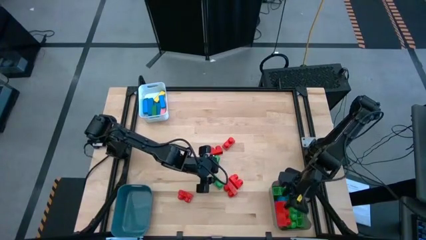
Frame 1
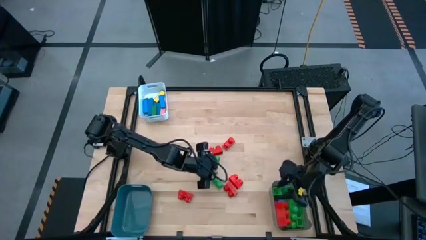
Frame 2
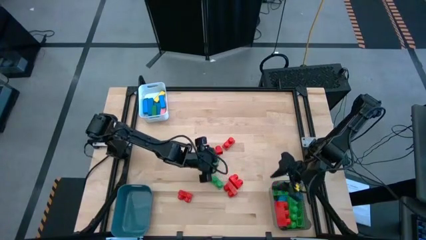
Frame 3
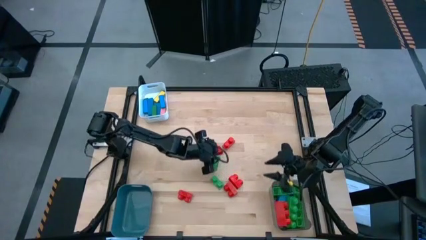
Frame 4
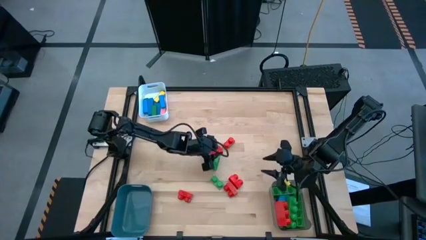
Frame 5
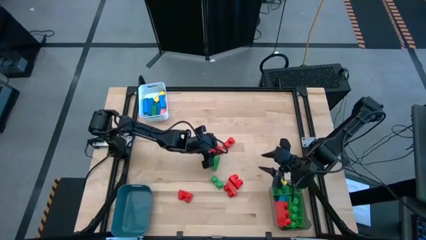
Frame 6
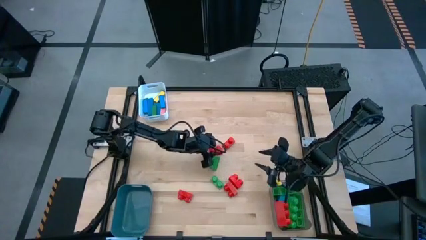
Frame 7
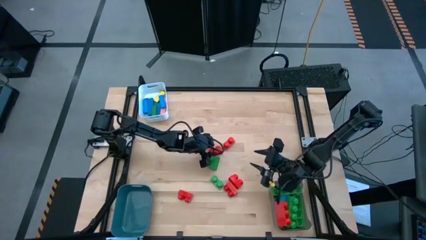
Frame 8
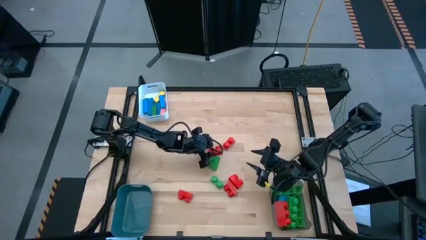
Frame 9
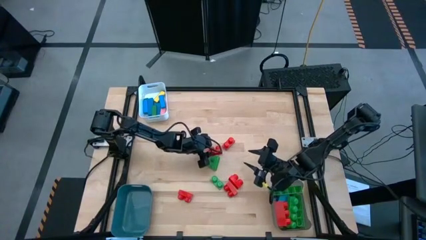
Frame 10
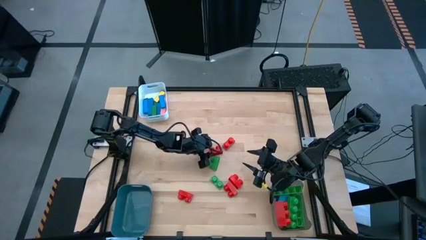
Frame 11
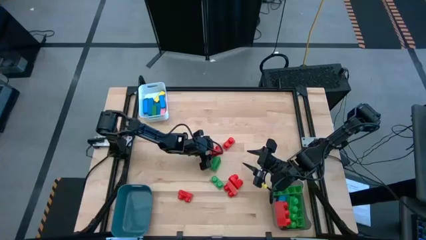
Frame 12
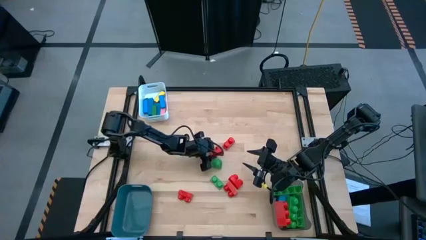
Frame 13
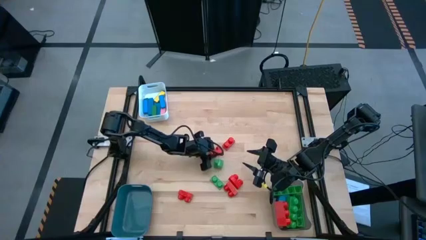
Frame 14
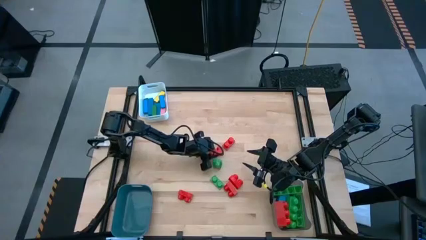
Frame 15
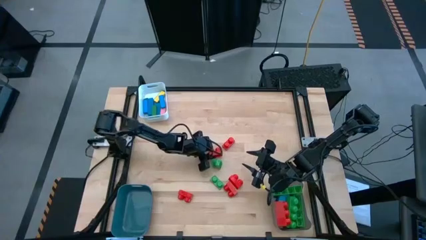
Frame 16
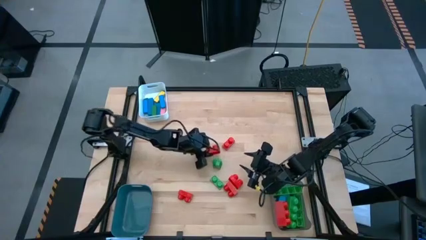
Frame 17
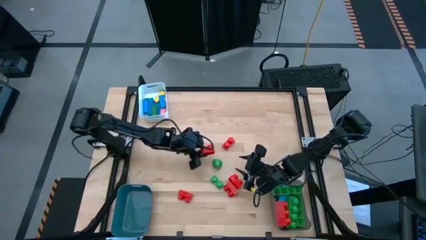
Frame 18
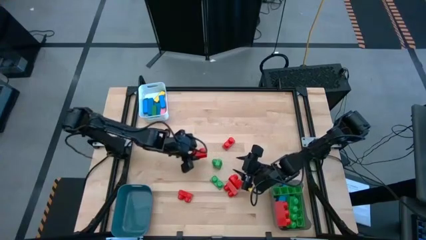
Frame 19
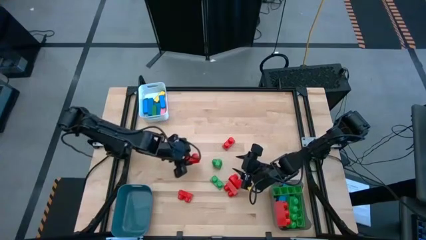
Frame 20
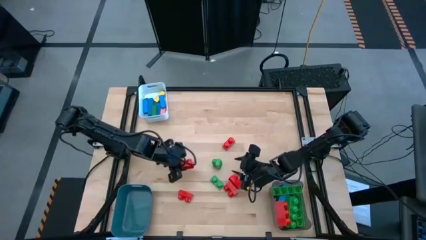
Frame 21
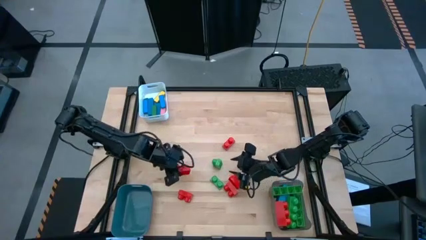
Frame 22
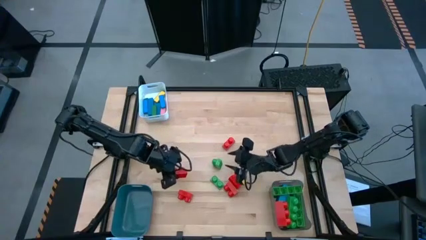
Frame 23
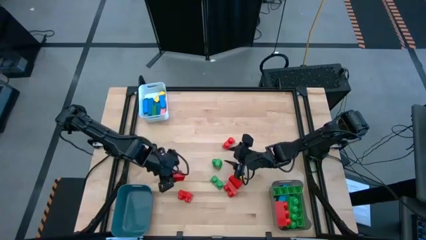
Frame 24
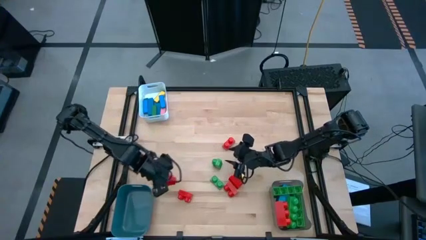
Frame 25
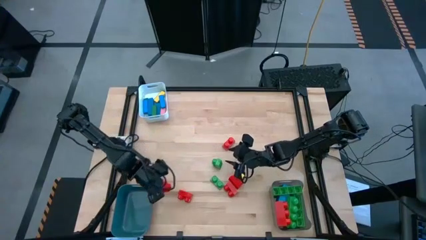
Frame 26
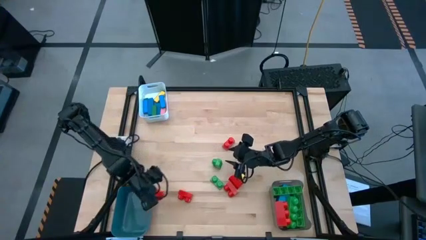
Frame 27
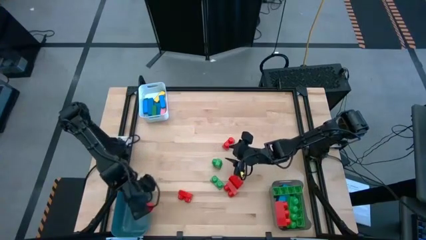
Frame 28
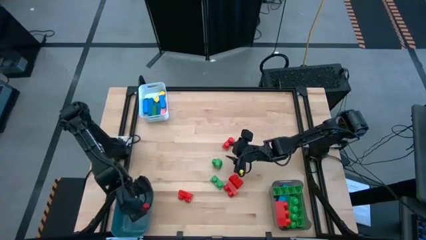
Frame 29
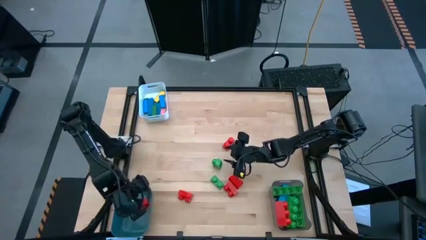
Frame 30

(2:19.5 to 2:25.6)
Task: Sort blocks by size
Put the red 2 stud gamepiece into the blue bin

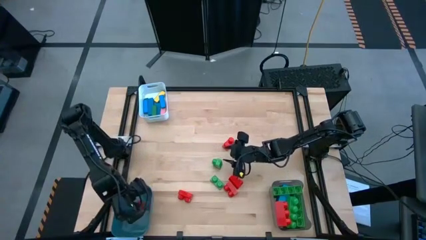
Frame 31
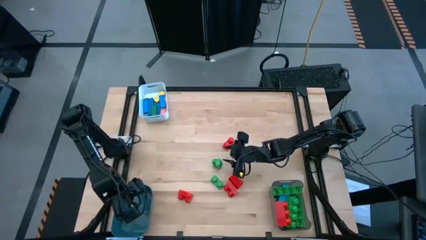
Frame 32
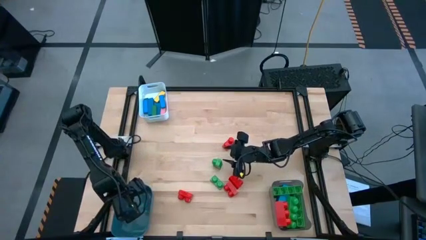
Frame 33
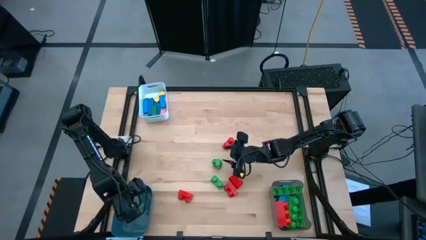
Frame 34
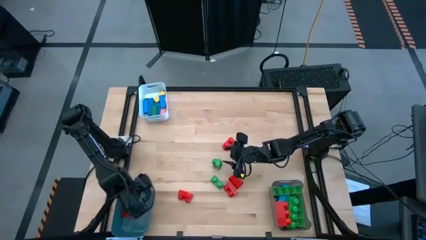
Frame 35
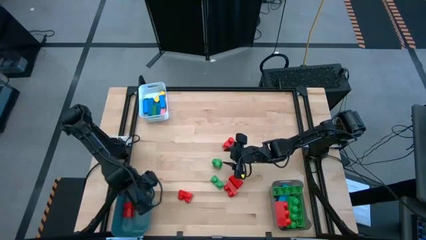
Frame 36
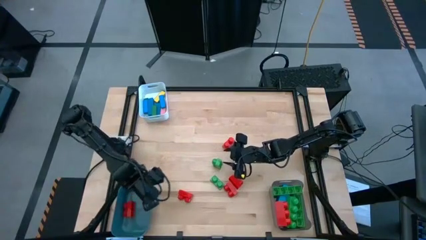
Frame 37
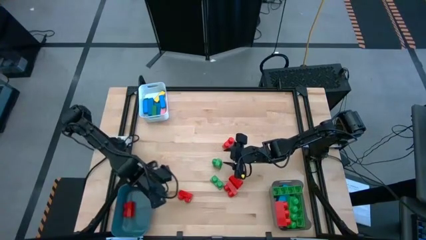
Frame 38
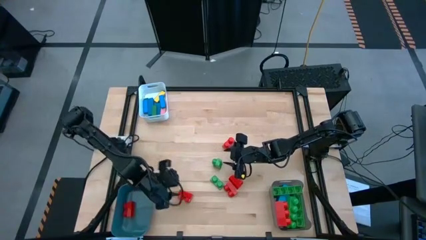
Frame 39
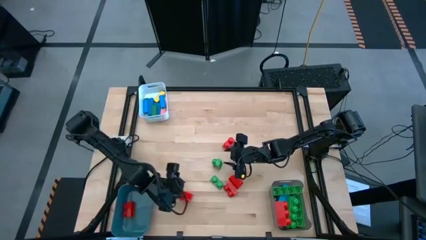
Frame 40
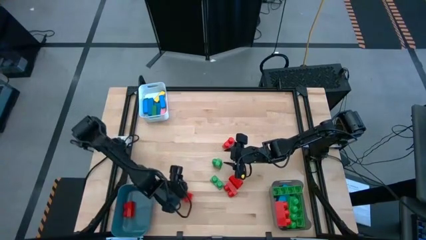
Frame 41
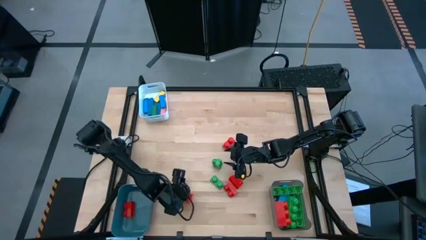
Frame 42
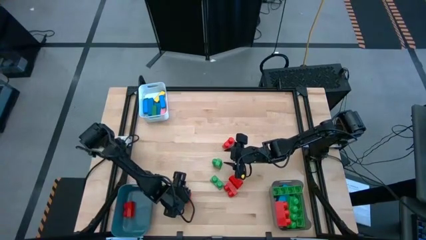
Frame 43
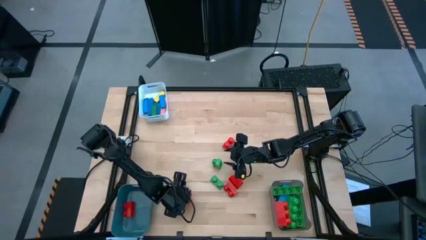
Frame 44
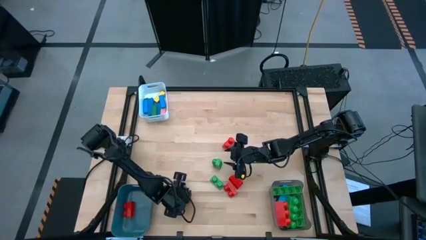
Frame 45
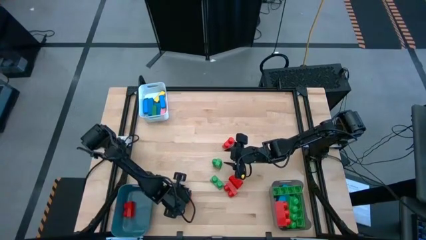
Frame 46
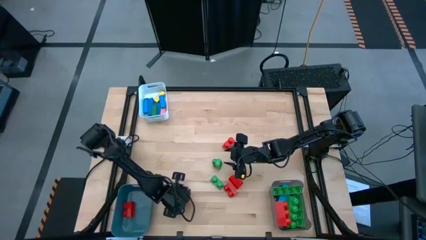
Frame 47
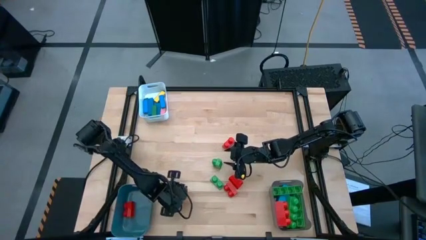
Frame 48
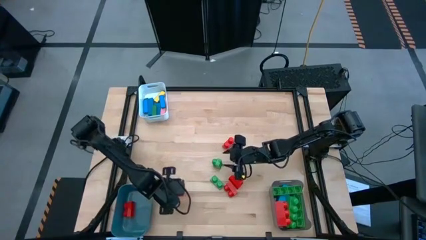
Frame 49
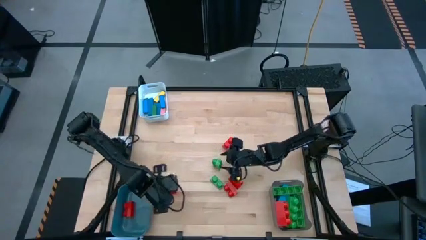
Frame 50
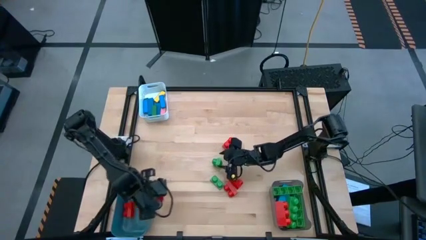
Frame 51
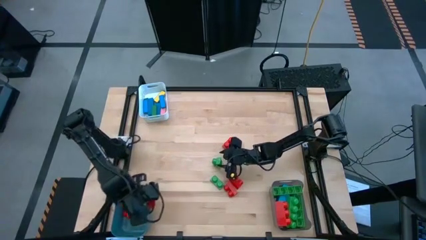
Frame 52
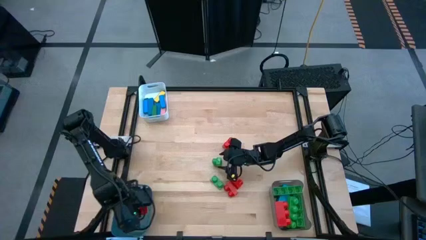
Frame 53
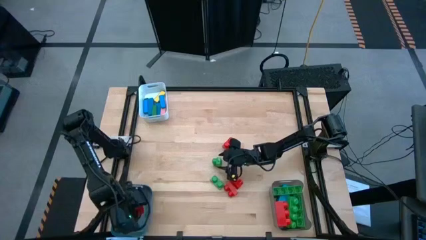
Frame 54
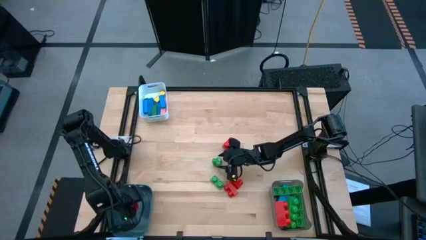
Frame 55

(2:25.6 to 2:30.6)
Put the red 2 stud gamepiece into the blue bin

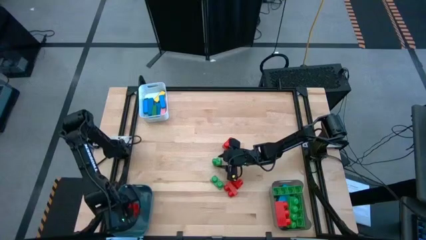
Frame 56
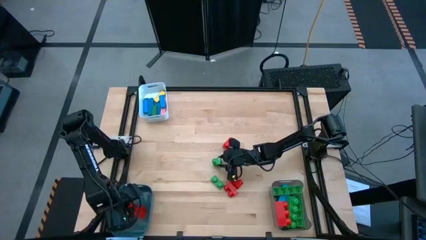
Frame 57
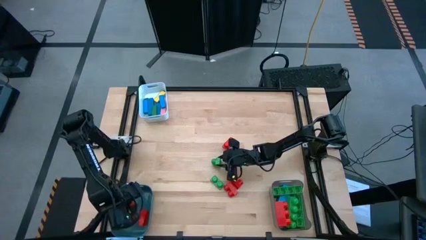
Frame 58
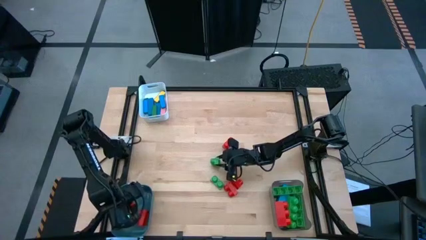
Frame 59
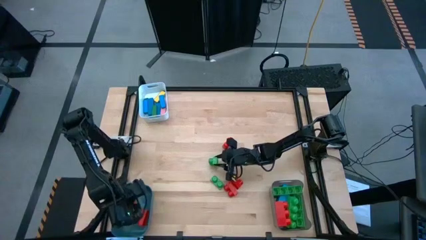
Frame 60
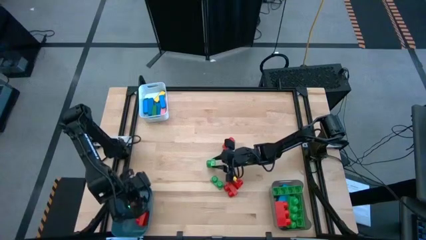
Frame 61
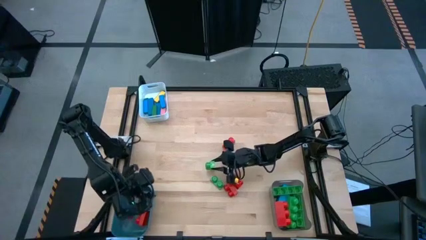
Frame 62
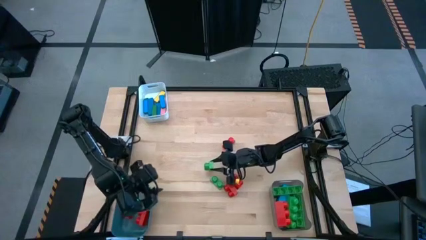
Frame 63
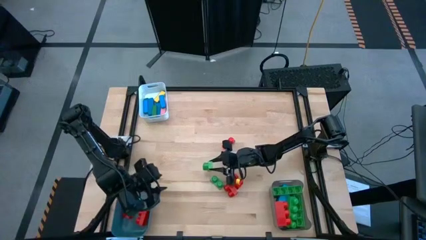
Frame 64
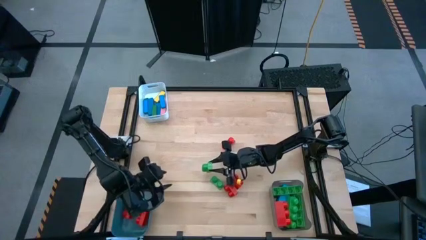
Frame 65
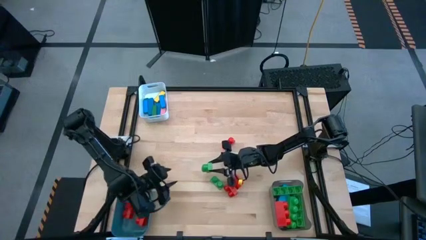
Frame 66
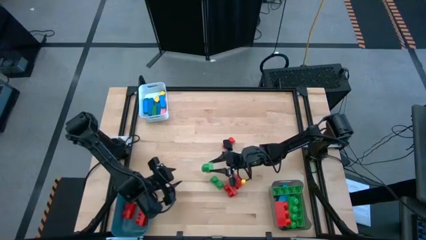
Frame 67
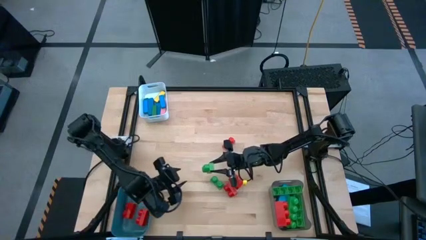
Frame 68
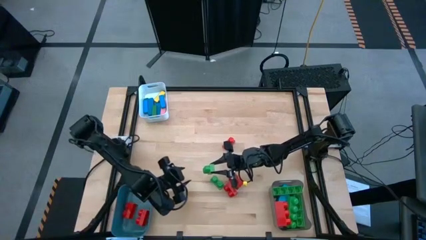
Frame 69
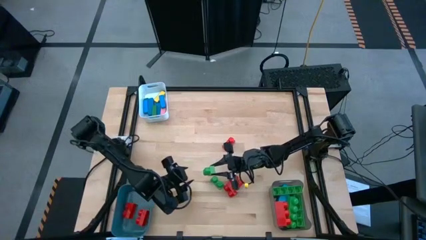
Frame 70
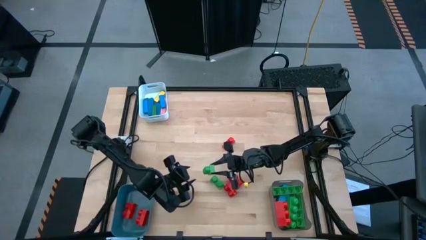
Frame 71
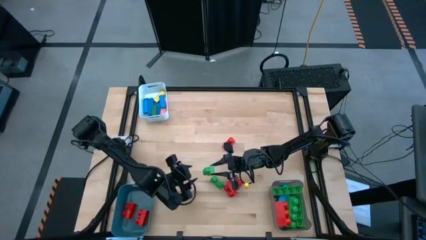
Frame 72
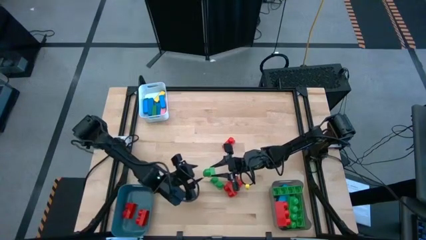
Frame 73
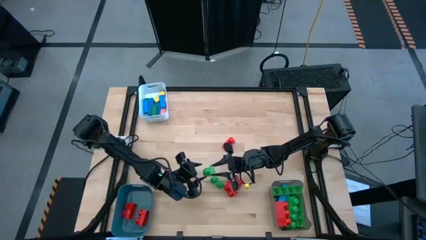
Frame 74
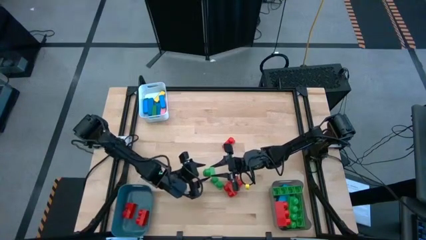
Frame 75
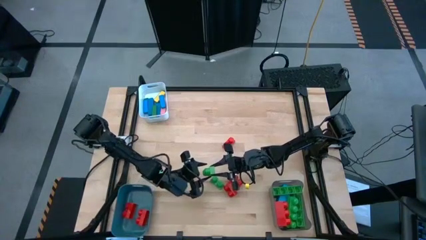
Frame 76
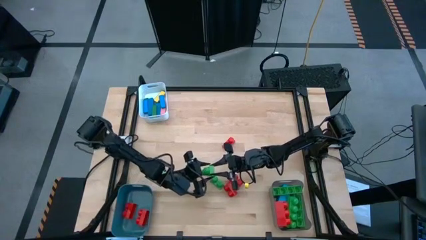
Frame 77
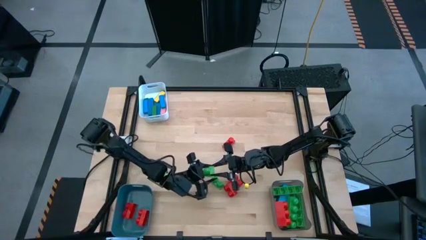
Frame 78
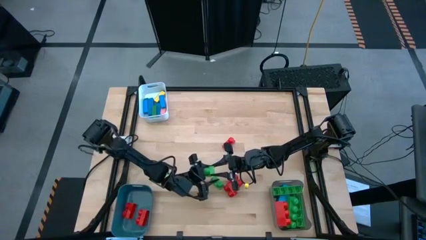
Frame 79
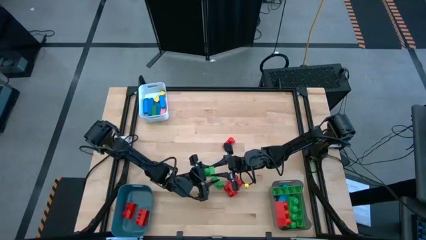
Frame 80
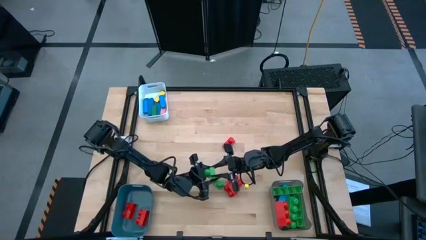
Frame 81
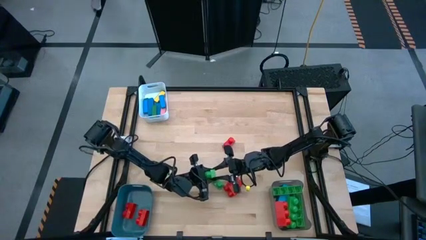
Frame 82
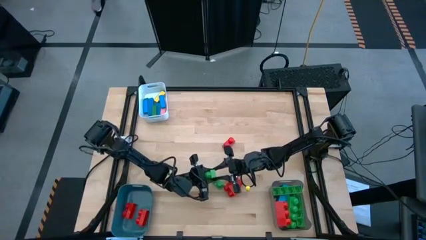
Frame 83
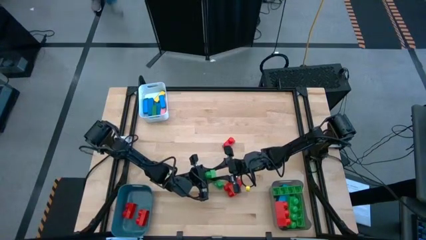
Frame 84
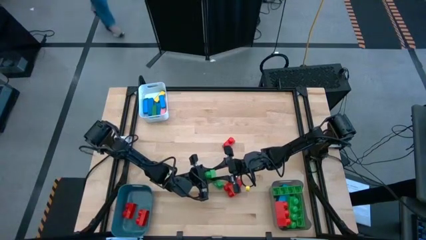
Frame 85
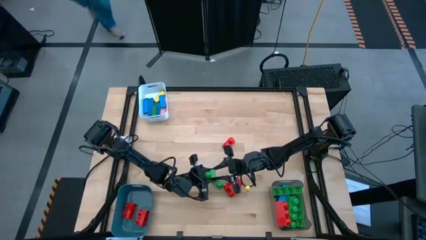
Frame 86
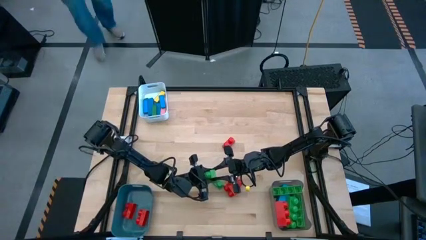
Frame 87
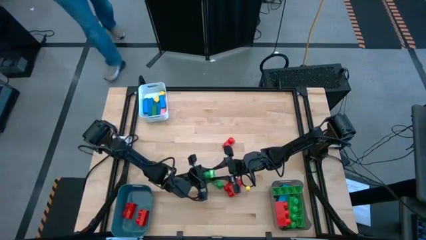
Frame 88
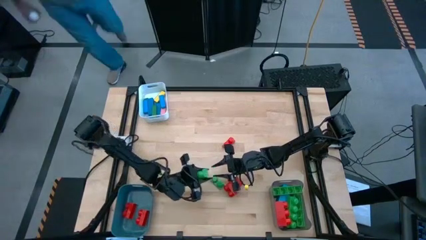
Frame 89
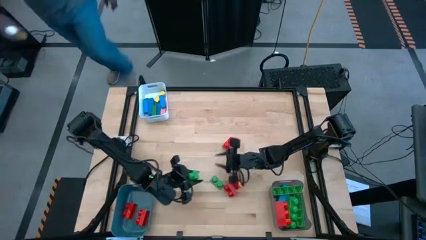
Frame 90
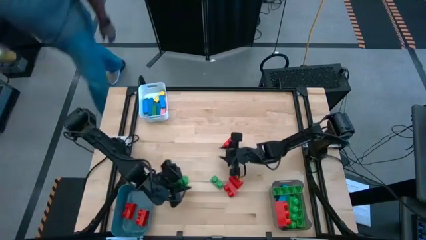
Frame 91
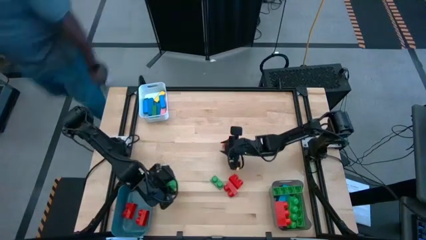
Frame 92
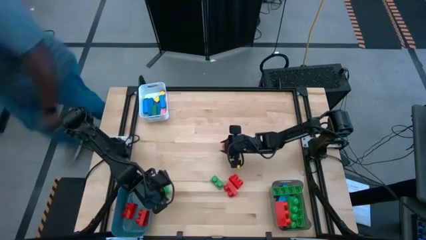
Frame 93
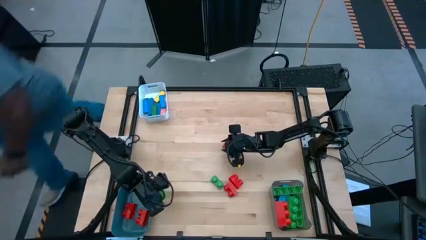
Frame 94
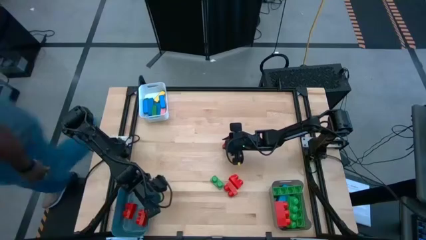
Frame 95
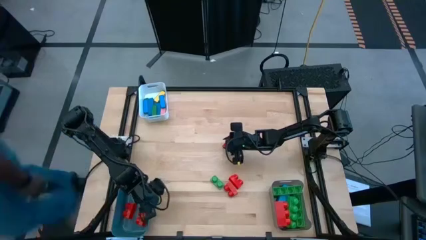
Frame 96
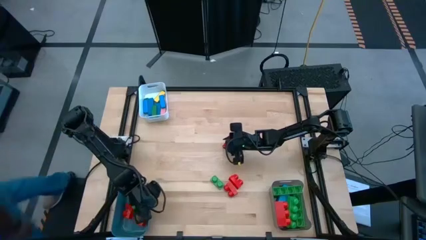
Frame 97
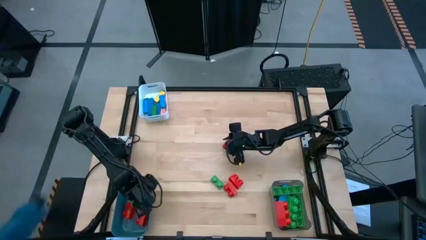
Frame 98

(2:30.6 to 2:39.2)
Put the green 2 stud gamepiece into the blue bin
